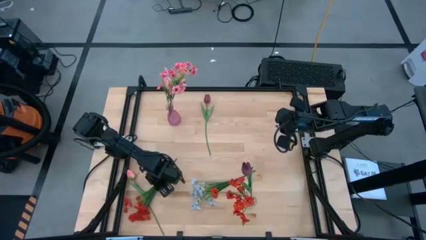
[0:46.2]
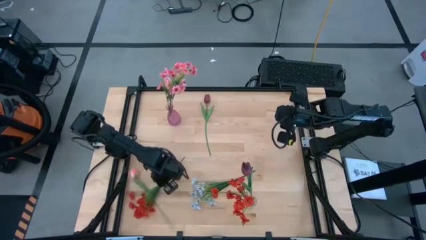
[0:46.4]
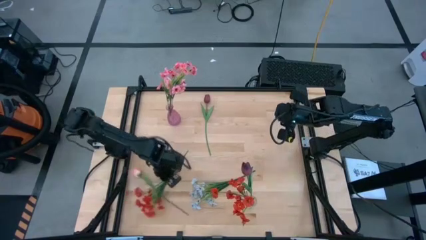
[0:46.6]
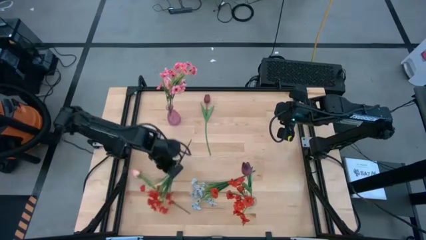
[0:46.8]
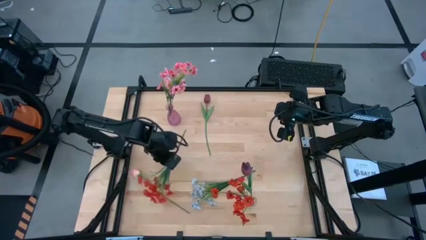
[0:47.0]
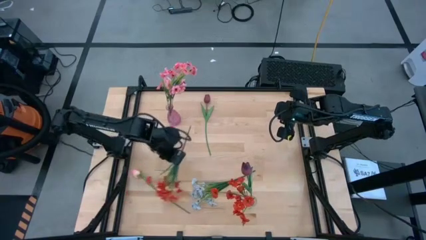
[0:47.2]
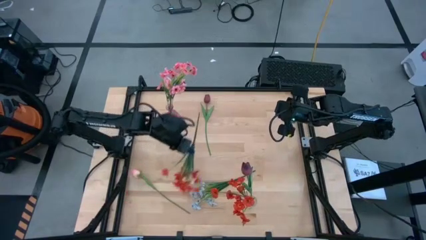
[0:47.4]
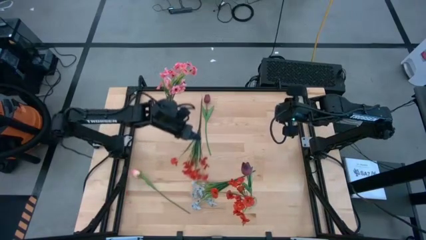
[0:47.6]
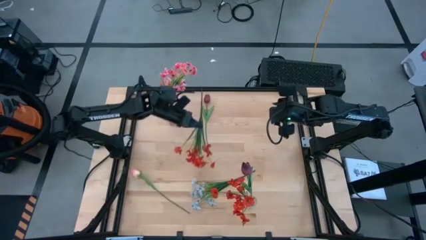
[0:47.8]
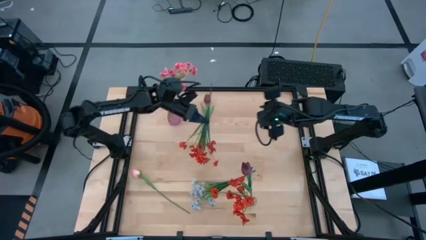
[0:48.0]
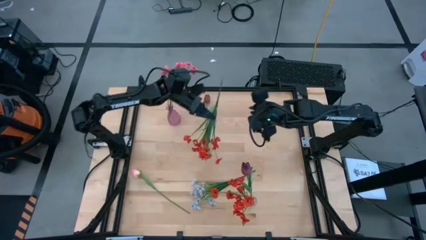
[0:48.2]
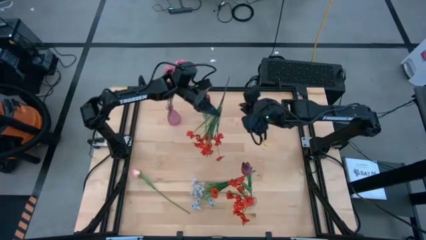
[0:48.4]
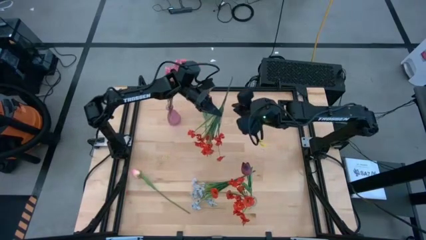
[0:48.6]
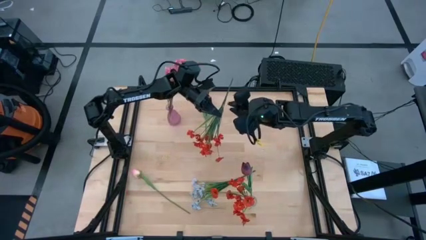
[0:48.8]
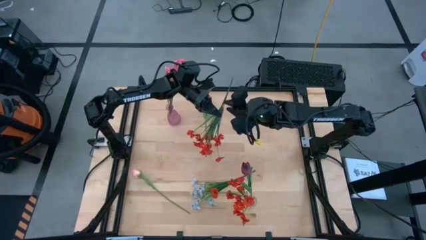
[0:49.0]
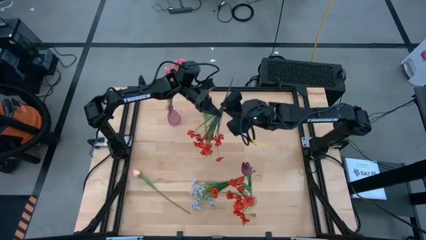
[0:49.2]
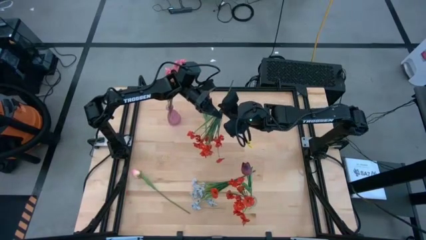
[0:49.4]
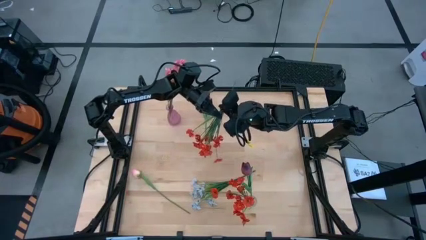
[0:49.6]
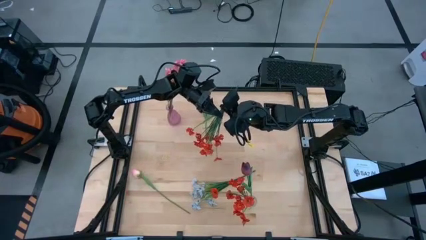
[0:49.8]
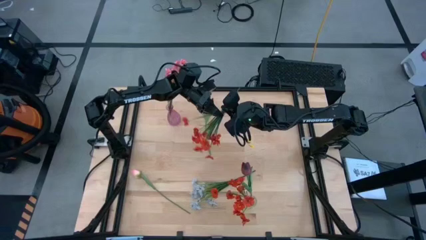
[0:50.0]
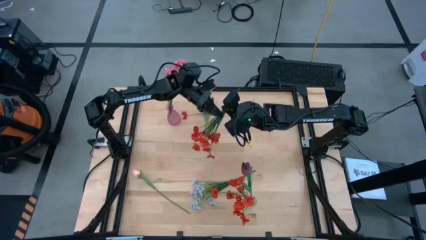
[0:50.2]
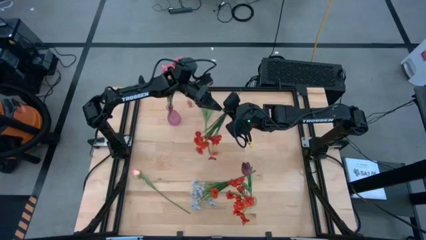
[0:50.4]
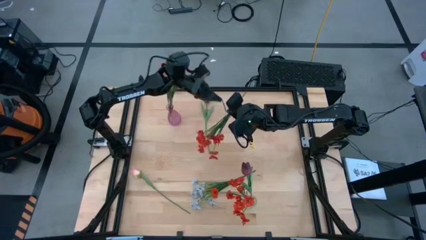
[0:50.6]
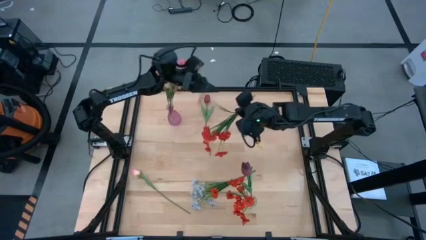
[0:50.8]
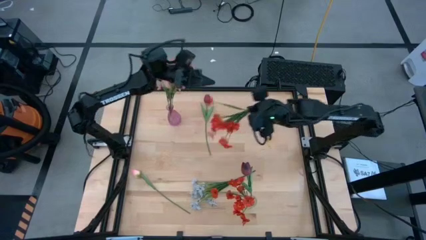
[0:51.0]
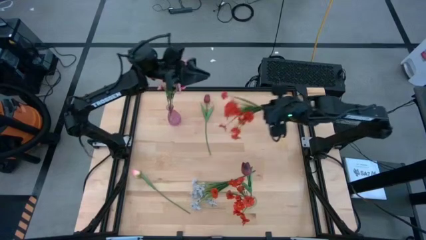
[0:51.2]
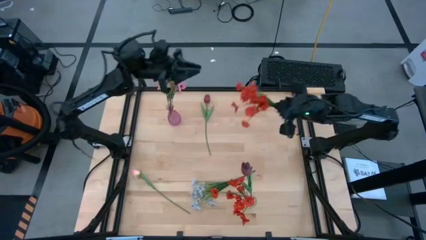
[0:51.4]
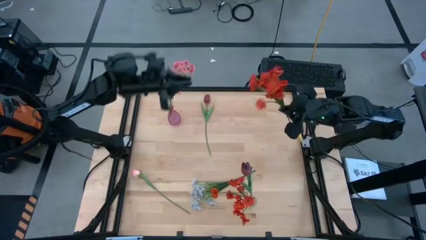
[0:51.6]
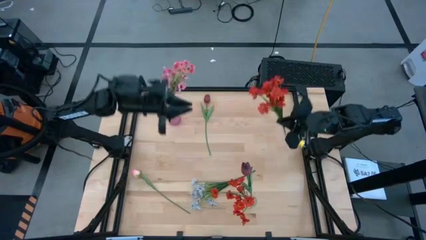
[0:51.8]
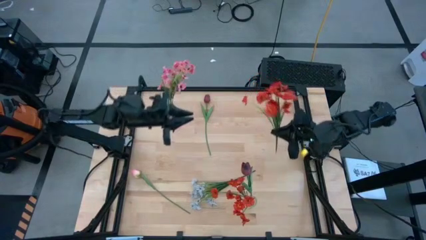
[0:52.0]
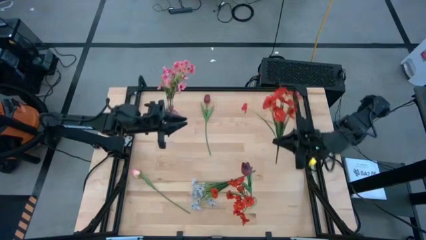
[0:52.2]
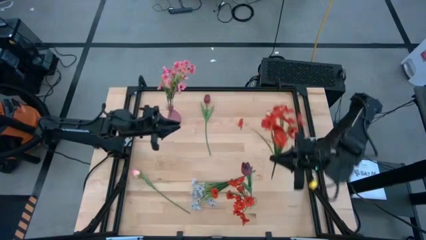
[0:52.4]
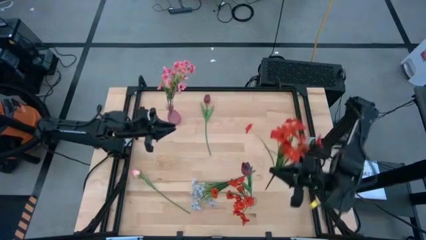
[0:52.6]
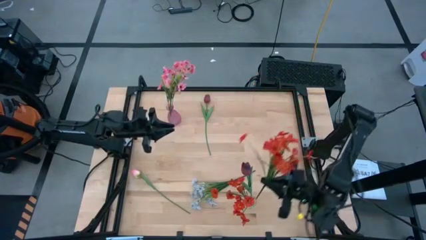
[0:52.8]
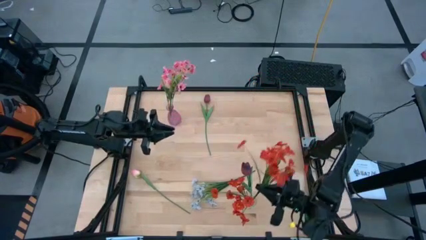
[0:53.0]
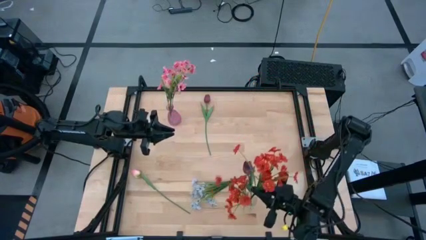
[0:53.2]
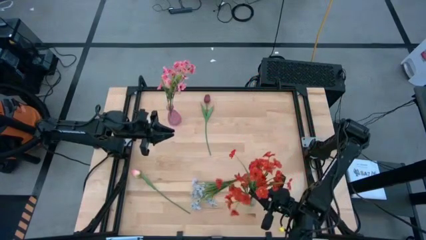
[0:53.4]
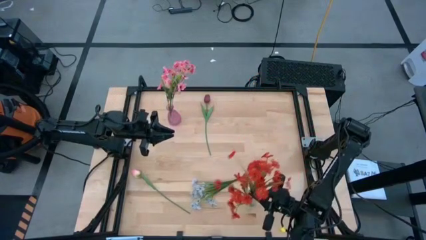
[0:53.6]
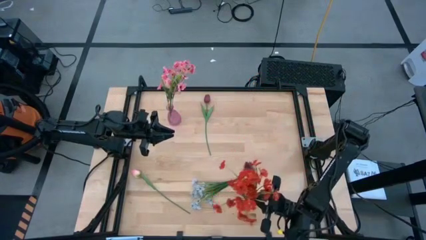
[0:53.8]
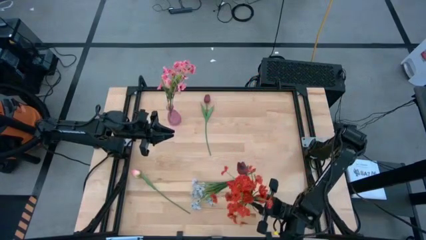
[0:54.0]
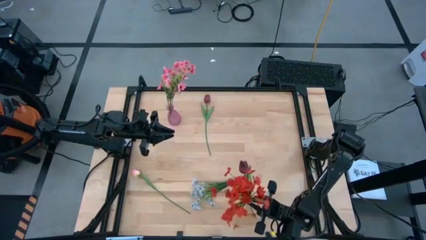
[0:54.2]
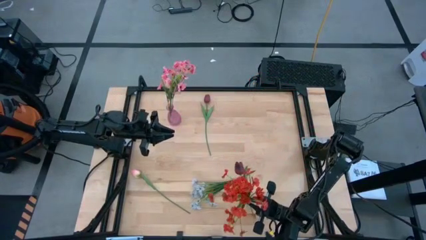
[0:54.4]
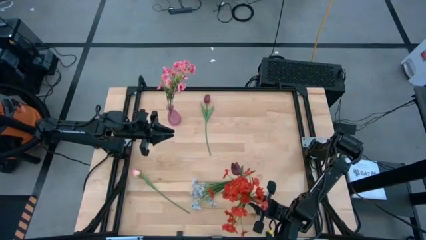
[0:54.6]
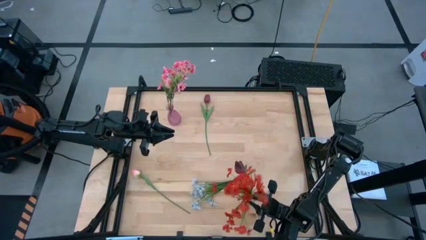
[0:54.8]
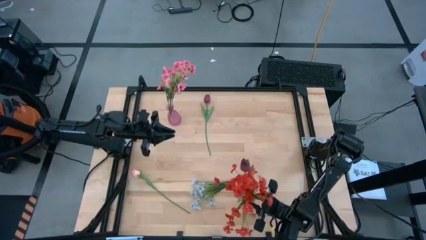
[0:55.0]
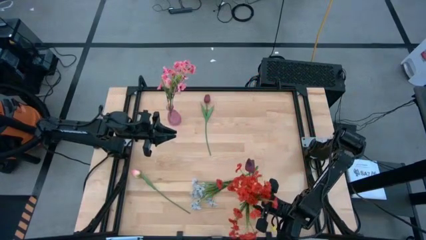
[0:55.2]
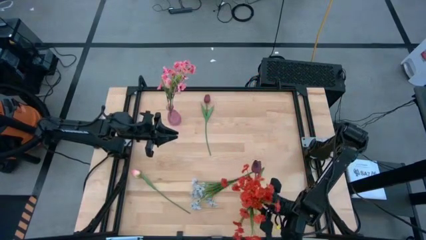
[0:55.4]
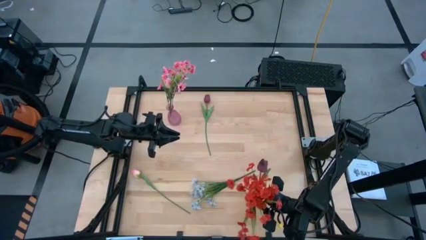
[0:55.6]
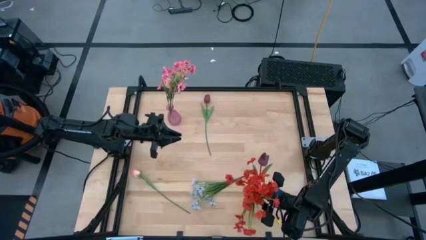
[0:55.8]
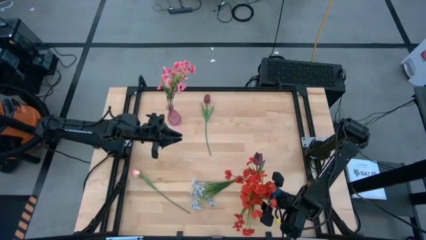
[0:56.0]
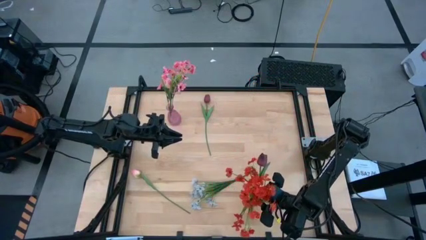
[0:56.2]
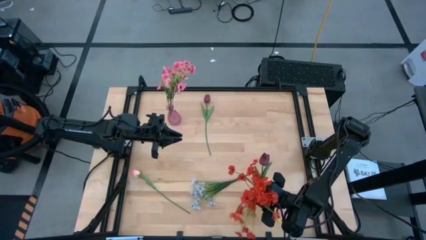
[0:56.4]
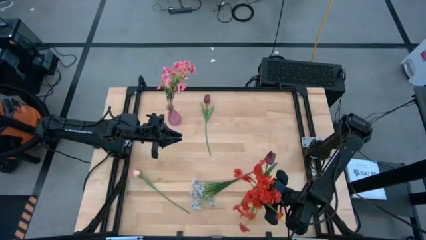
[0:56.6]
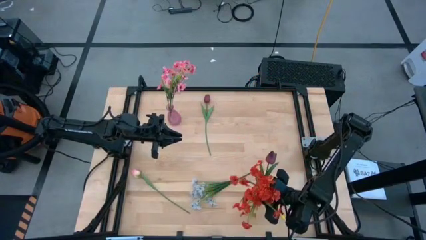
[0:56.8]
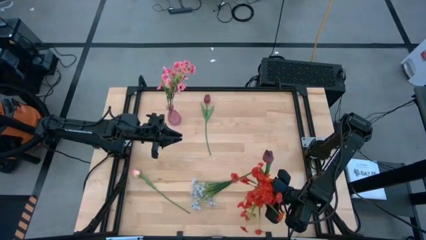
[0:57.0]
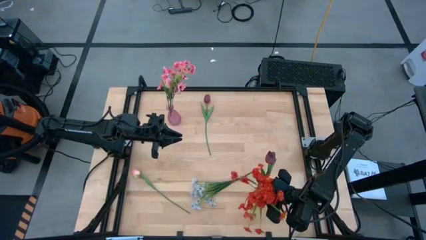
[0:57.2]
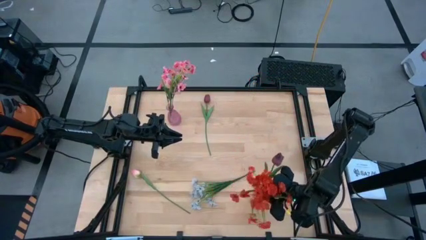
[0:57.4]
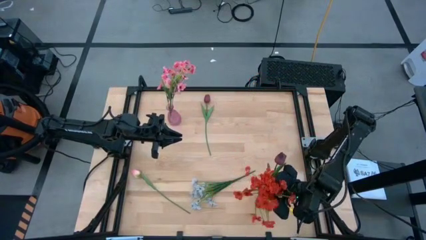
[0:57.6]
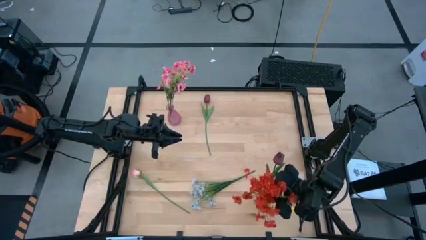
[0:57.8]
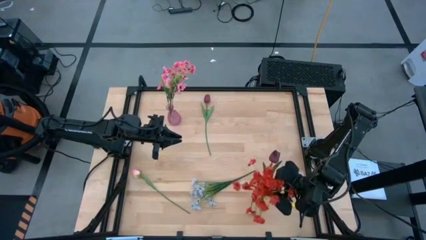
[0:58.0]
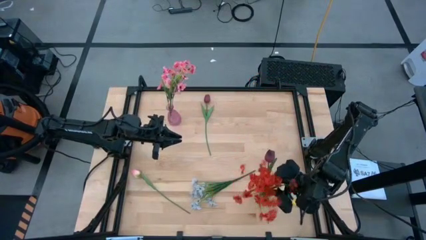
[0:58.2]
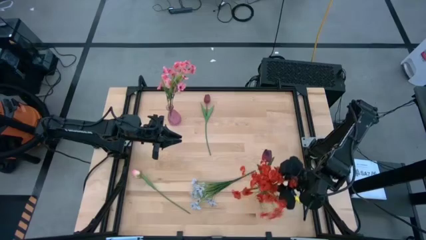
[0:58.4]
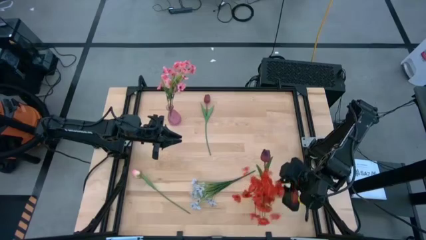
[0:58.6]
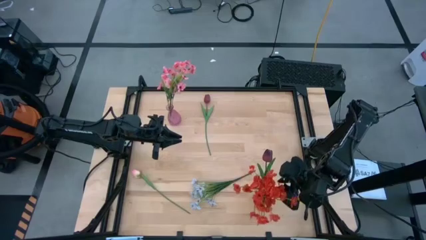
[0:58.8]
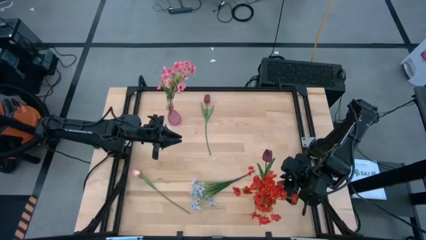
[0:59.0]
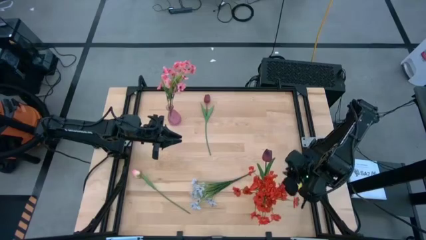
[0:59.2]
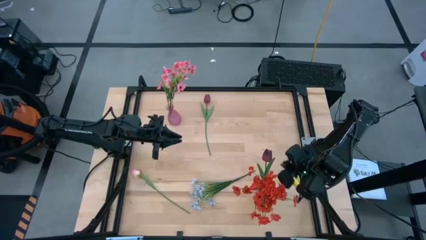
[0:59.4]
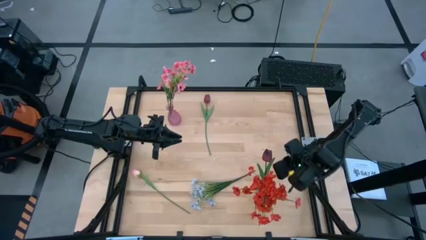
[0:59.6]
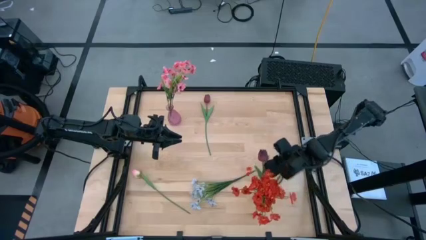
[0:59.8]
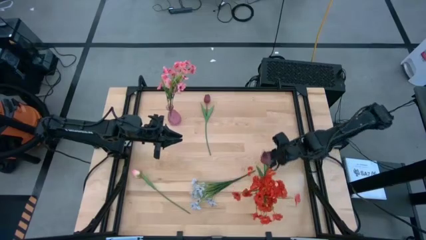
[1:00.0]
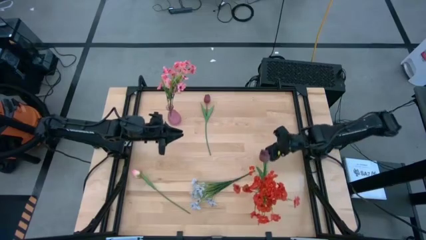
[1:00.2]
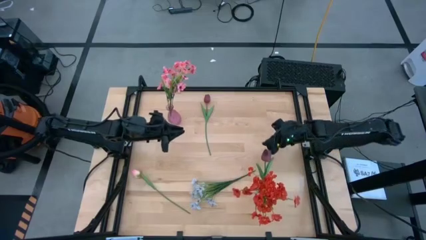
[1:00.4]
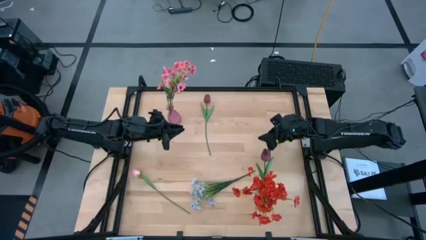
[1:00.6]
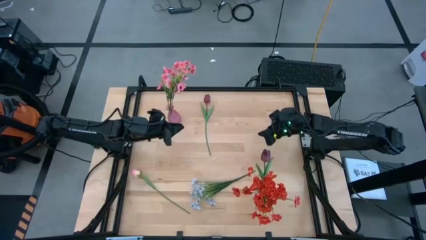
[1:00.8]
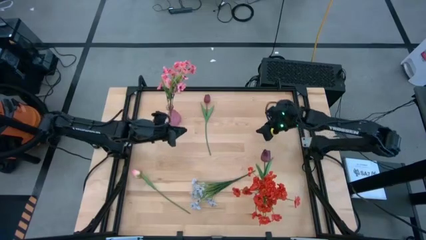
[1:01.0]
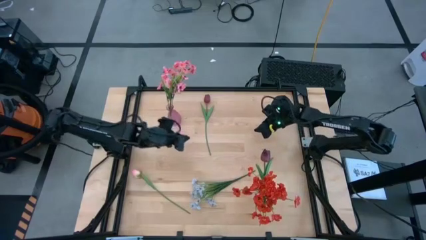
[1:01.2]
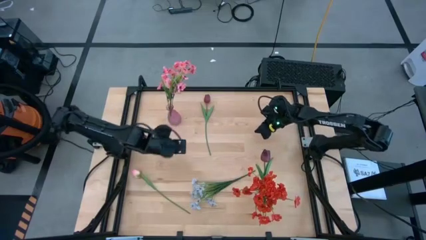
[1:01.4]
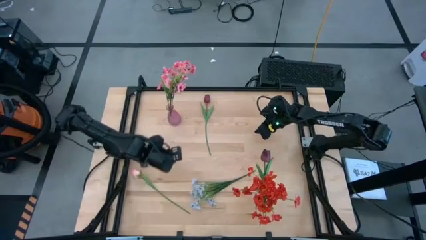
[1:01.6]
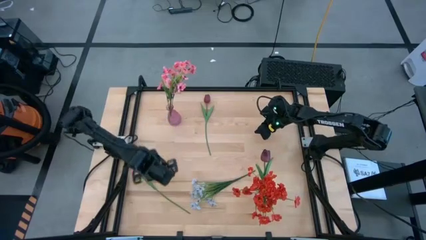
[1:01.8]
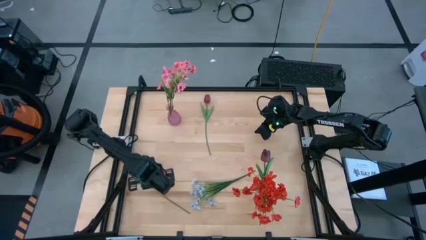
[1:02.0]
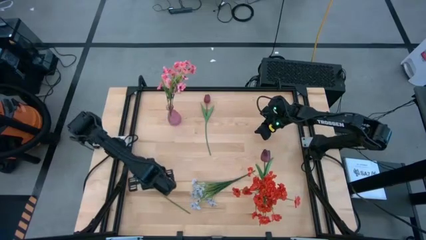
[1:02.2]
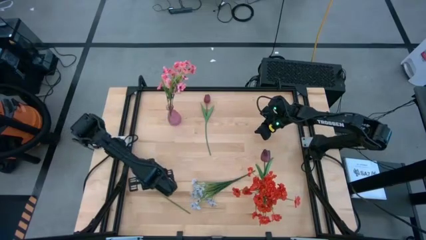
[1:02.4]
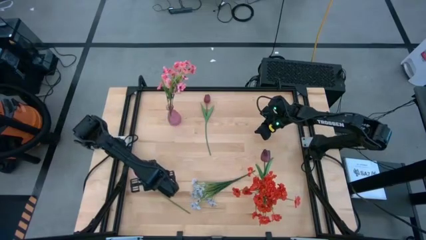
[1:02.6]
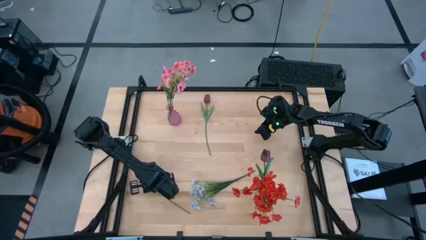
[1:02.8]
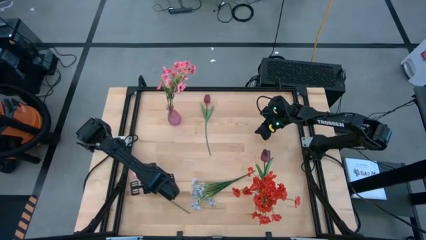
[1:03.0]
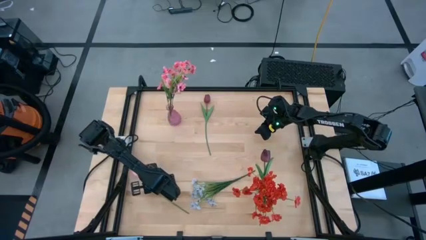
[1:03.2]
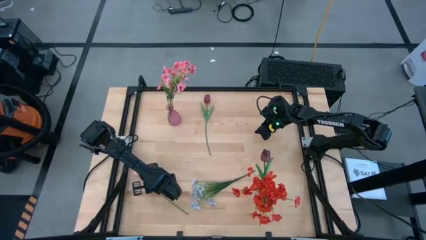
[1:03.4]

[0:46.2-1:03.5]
Task: Sort flowers into vase by color
Put the red flowers into the transparent vase
